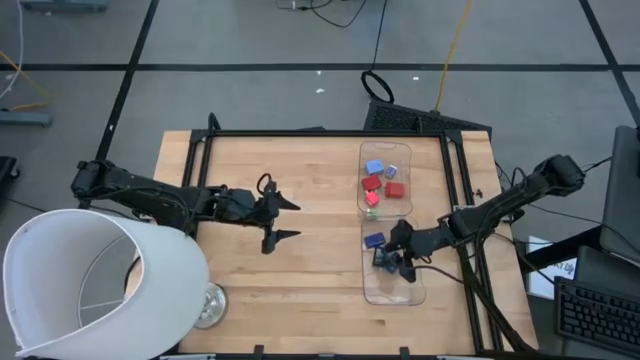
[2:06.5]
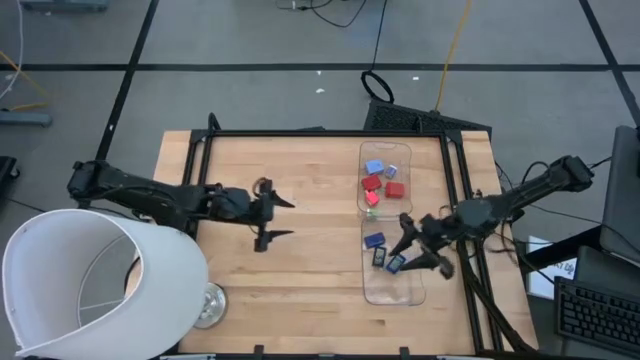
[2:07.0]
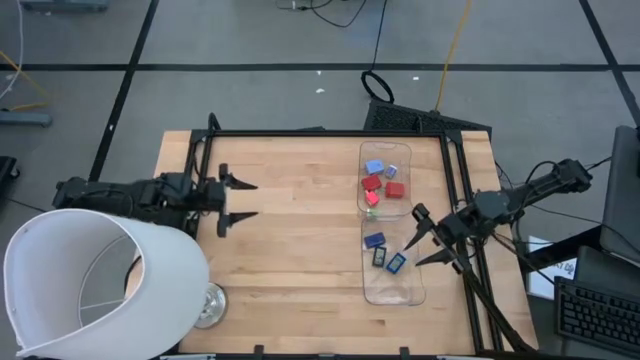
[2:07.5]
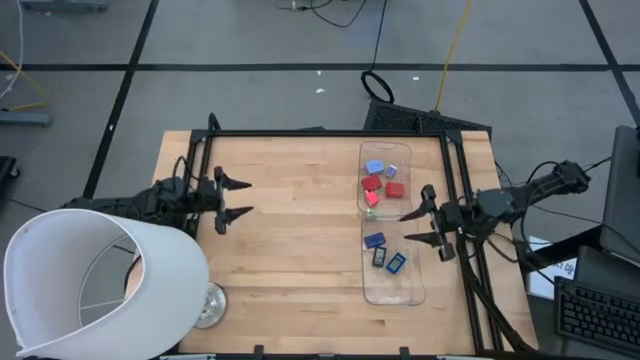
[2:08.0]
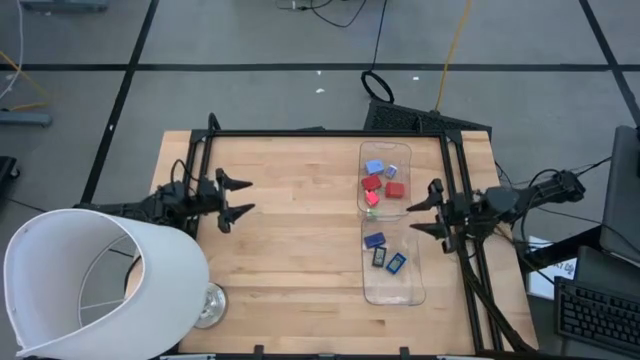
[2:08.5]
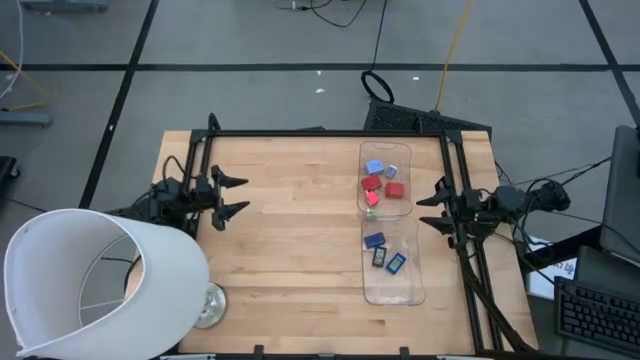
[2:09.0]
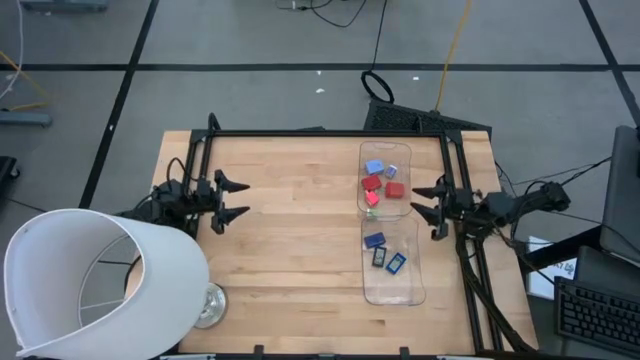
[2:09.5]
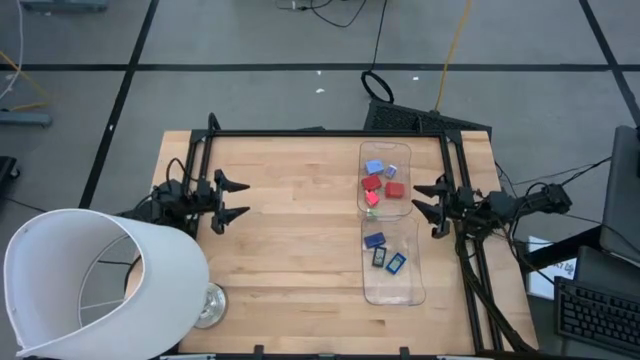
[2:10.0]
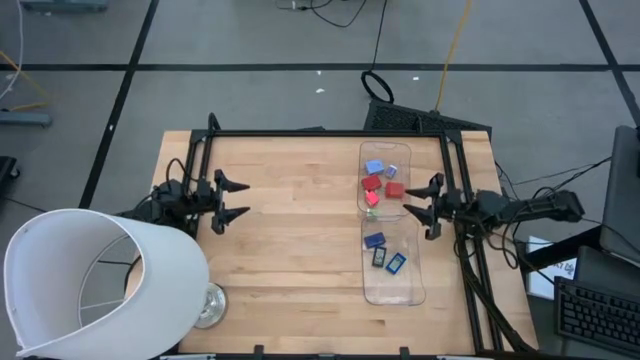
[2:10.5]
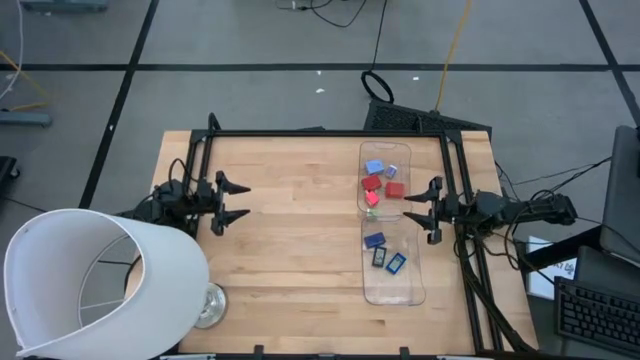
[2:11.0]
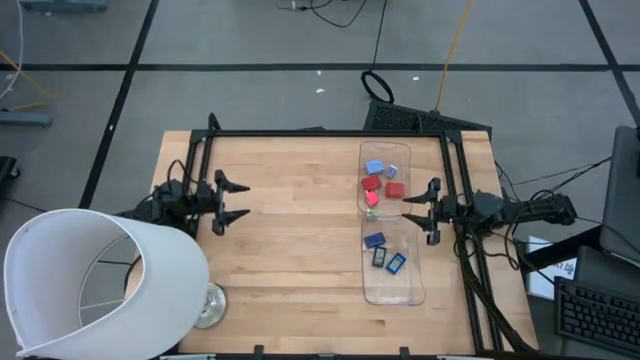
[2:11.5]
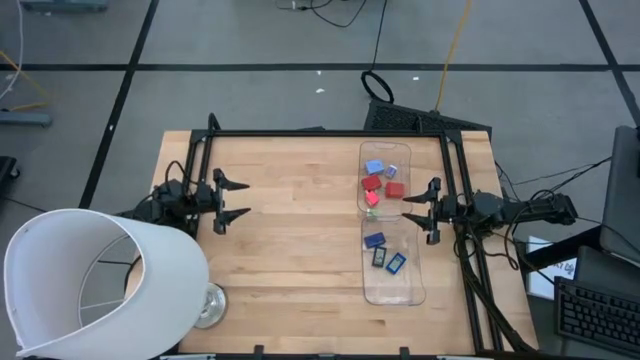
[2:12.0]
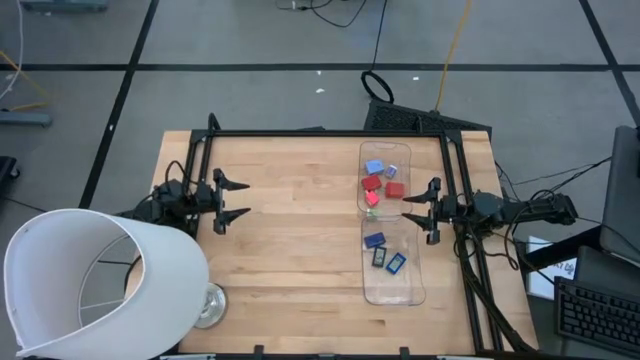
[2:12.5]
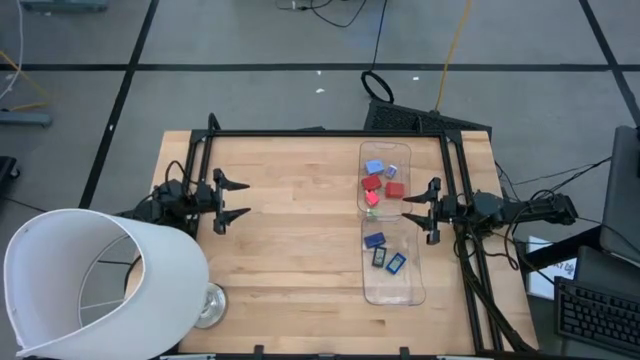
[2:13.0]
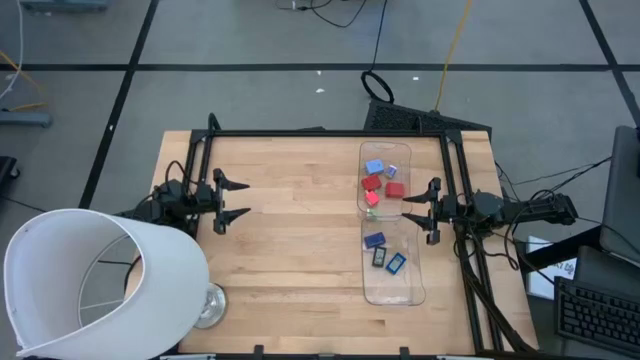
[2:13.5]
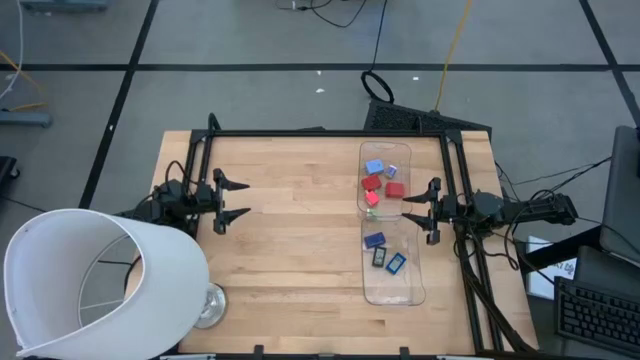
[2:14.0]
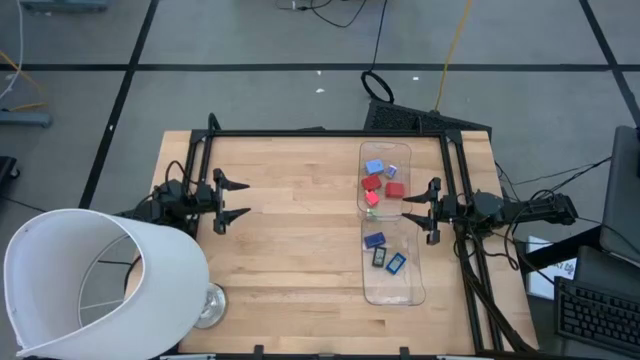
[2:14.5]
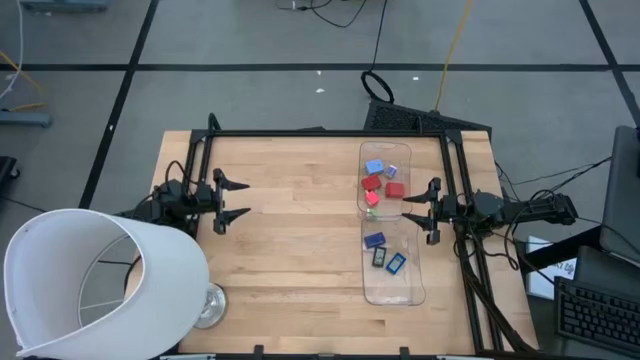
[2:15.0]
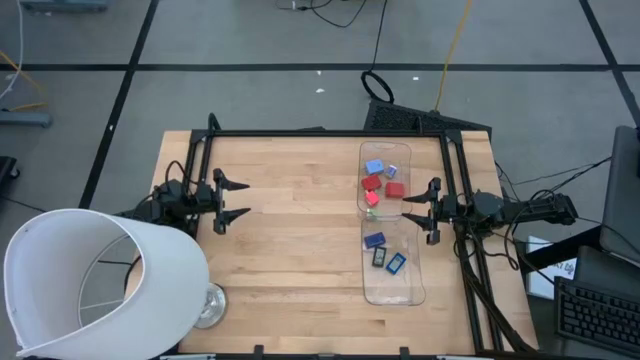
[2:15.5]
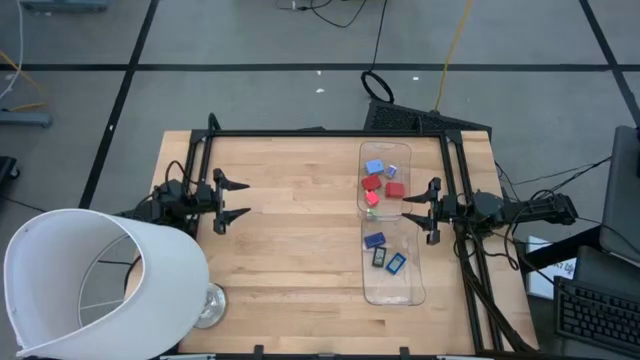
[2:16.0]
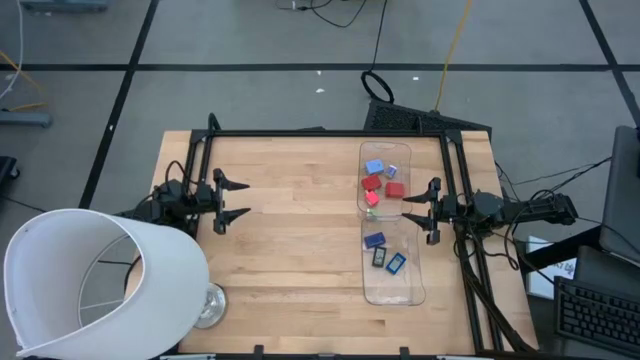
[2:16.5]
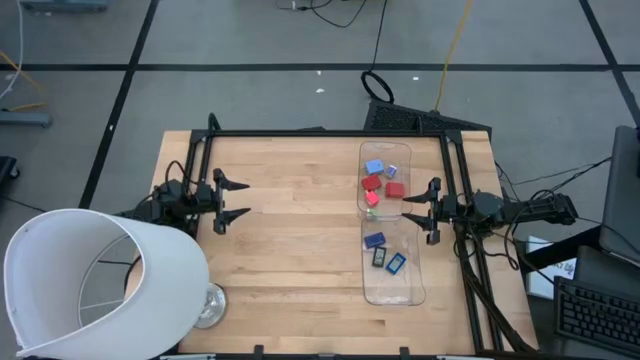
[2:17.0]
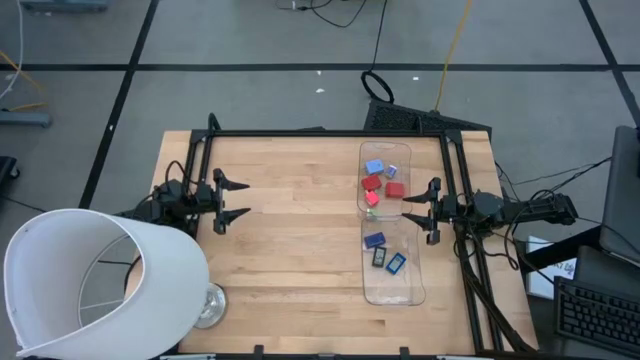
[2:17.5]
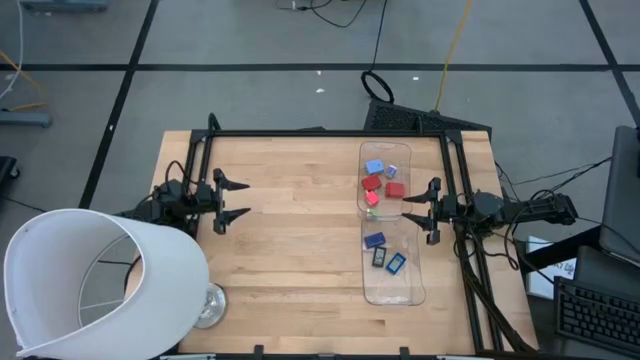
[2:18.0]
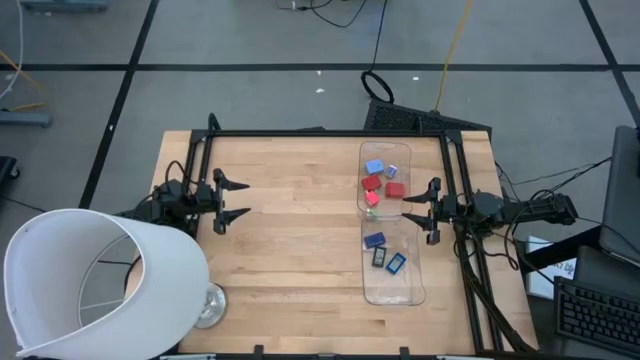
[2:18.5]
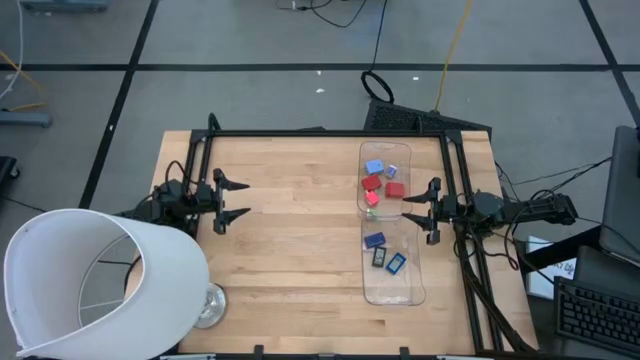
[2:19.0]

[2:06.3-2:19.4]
Task: Pick & Place Office items
Return to Home Position

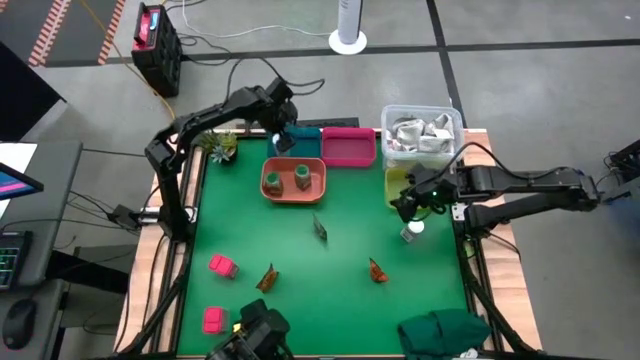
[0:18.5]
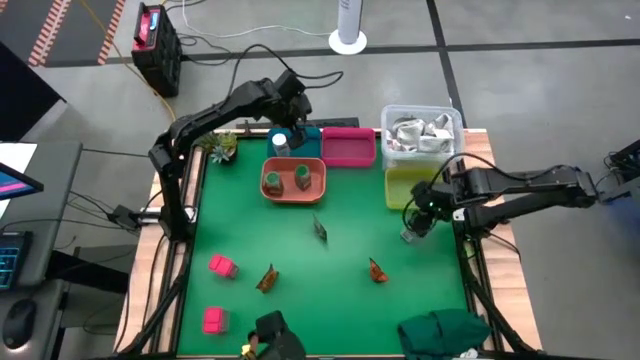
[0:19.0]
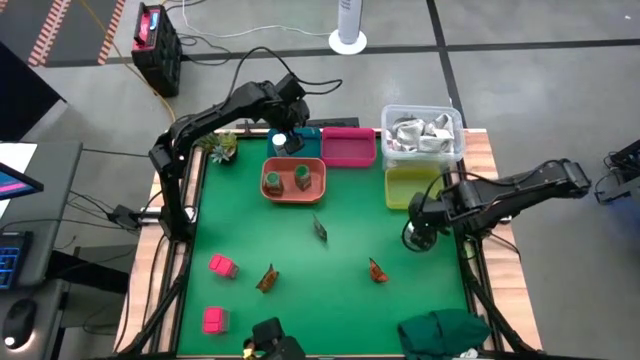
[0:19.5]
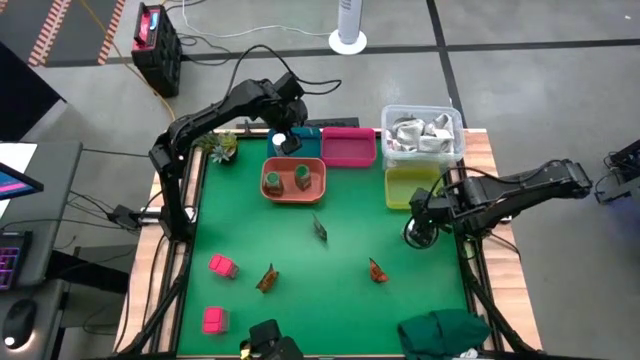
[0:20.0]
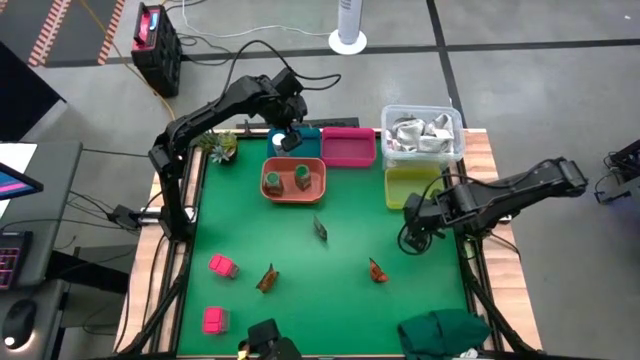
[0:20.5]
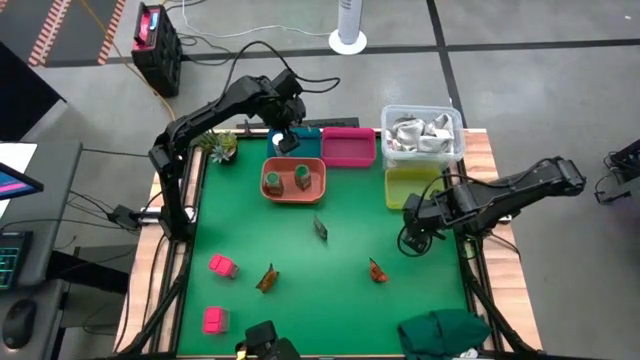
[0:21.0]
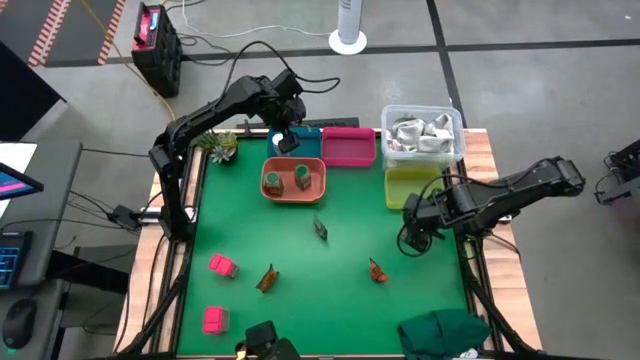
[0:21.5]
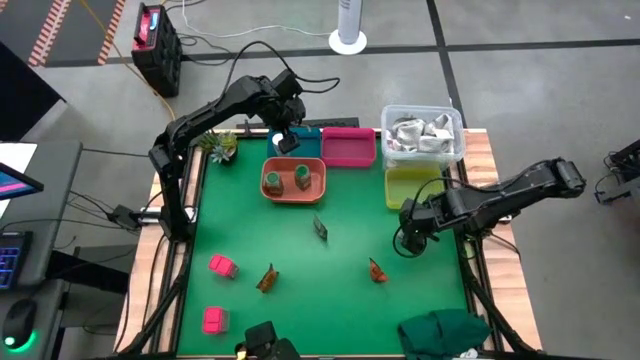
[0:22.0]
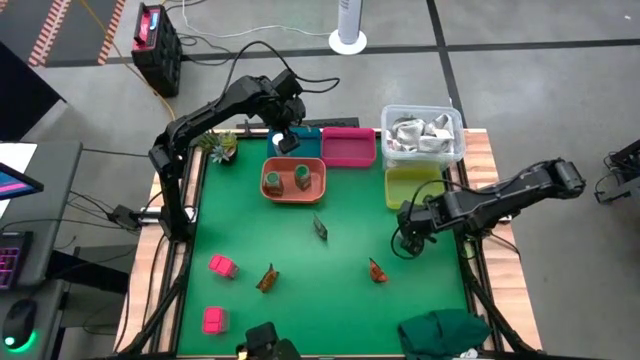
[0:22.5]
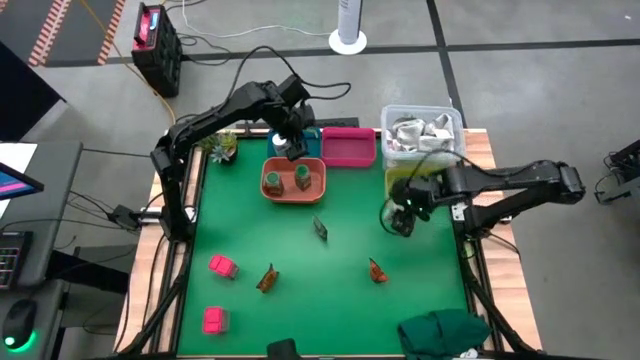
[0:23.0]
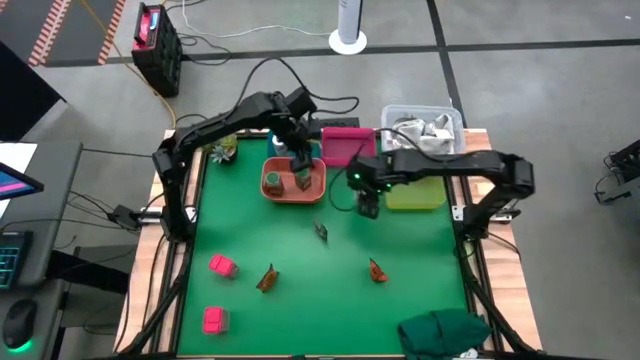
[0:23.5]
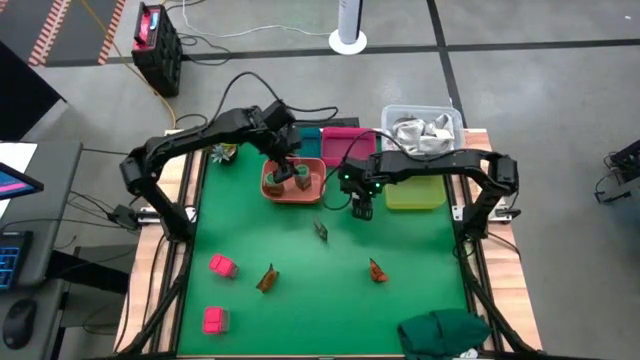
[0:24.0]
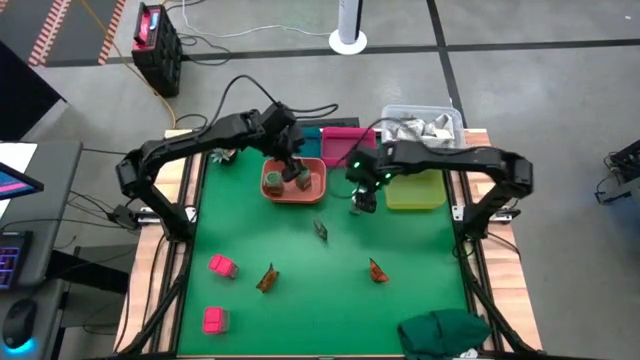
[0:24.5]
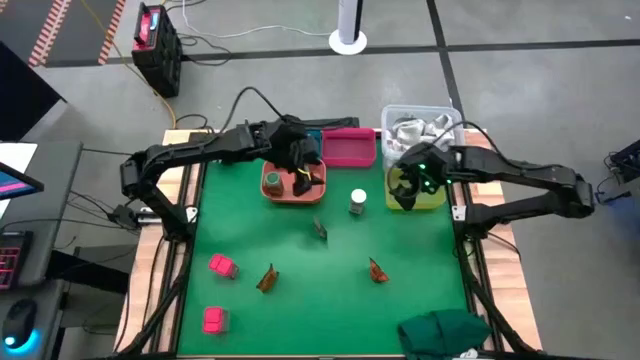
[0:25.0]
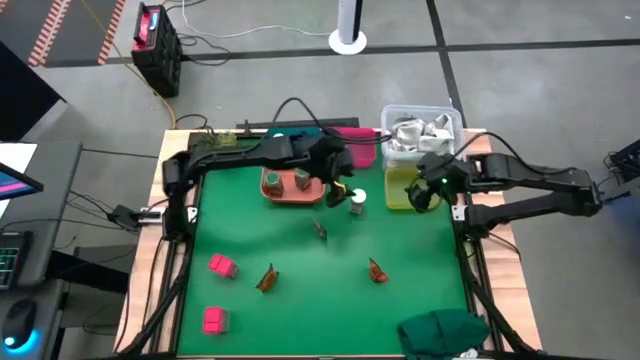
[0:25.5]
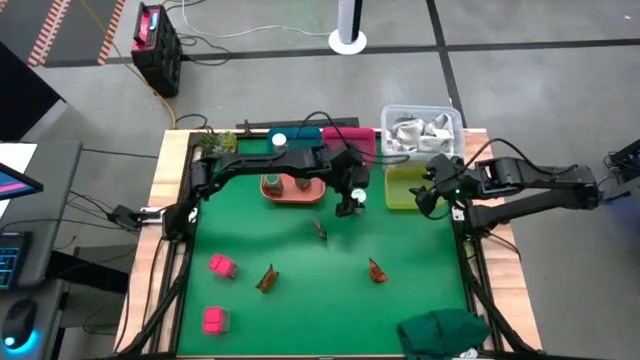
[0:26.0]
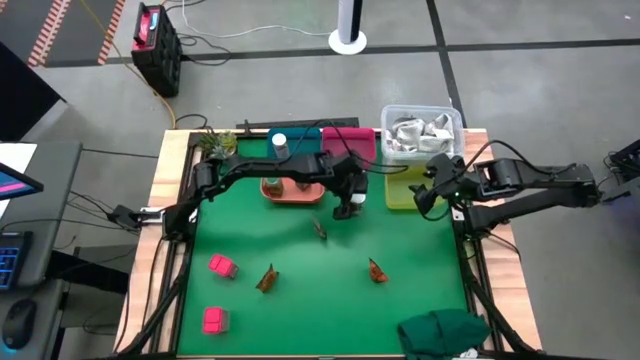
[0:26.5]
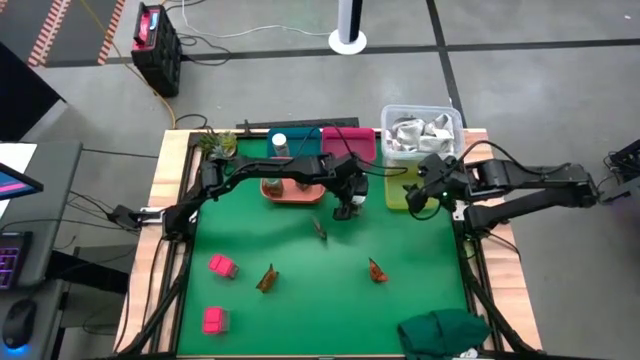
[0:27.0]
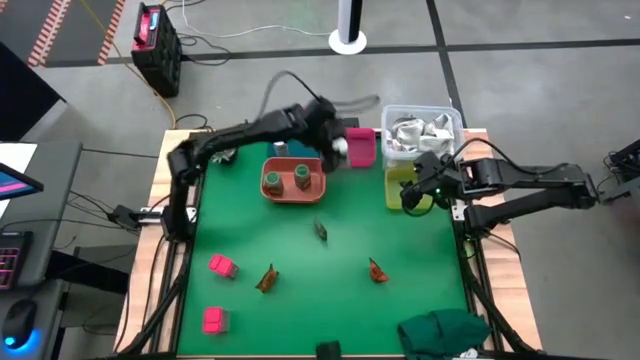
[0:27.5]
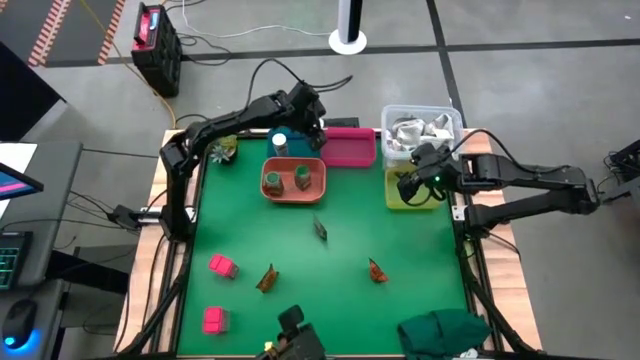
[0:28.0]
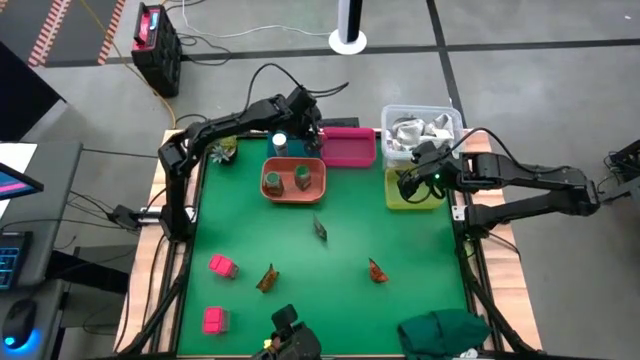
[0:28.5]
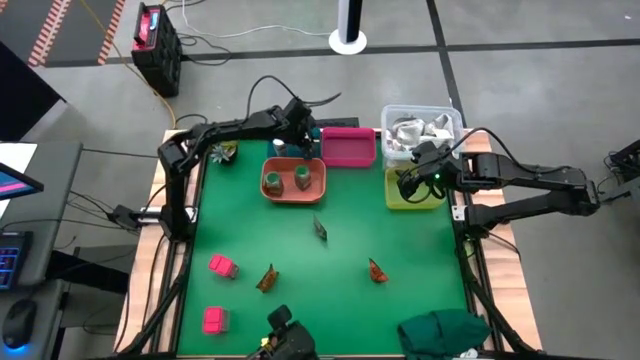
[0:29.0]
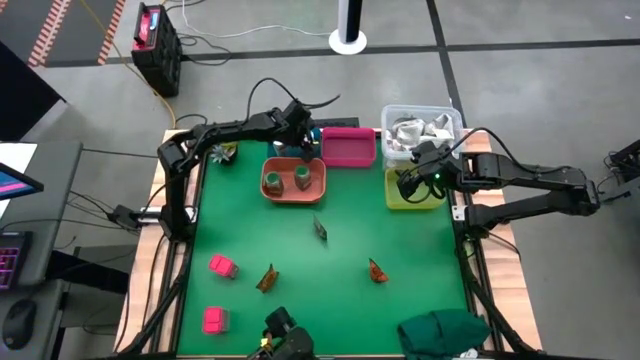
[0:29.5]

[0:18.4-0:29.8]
Task: Sort spices by type
Put the white seasoning bottle into the blue bin
